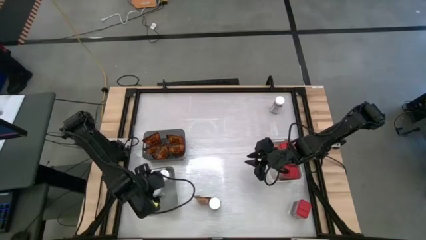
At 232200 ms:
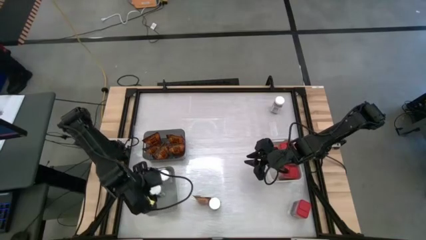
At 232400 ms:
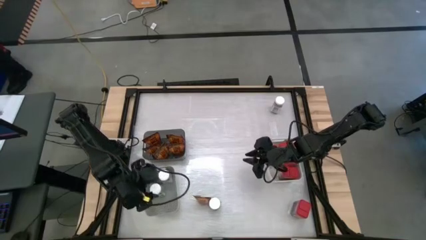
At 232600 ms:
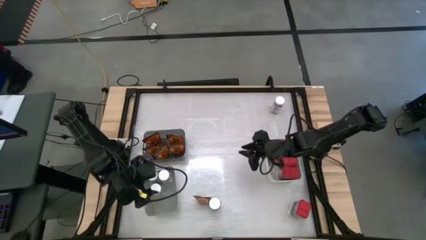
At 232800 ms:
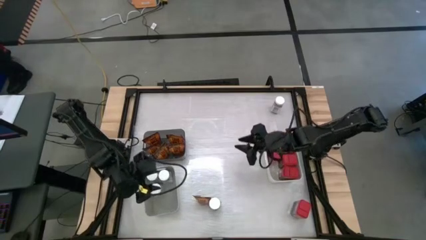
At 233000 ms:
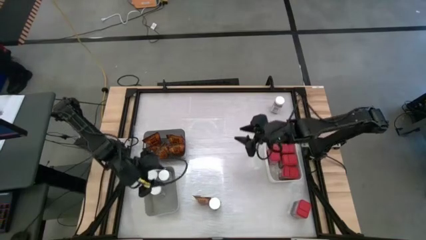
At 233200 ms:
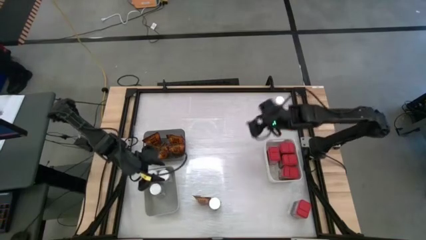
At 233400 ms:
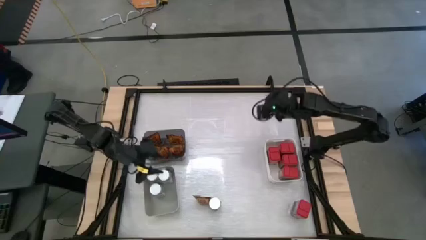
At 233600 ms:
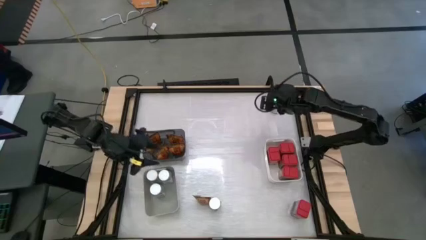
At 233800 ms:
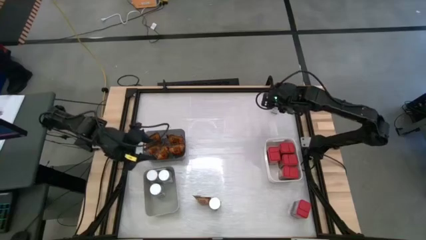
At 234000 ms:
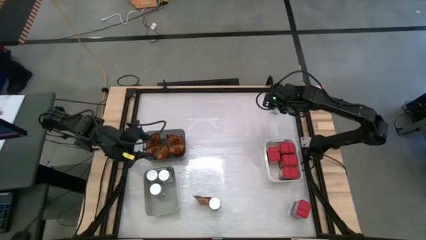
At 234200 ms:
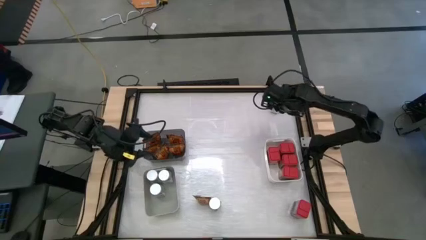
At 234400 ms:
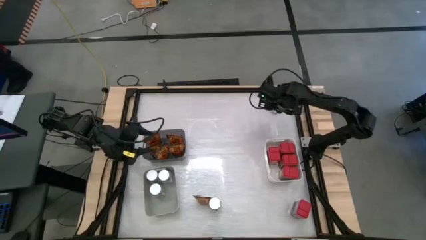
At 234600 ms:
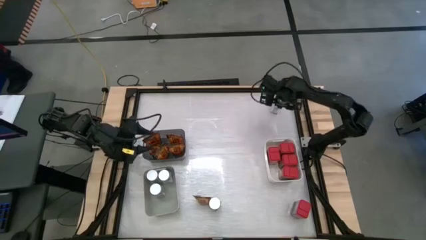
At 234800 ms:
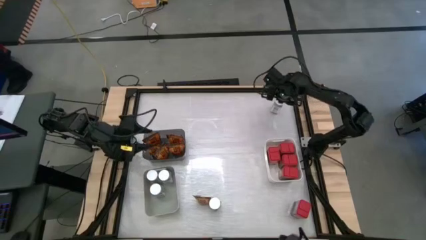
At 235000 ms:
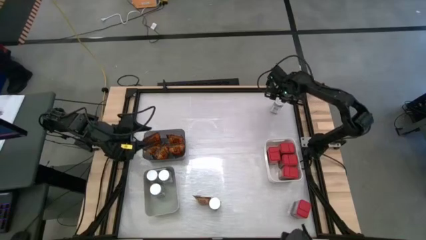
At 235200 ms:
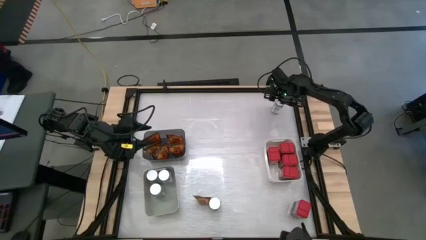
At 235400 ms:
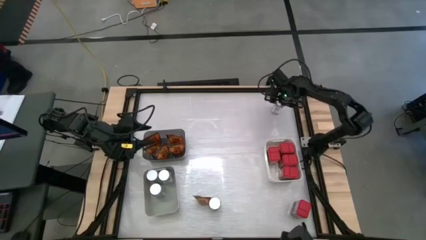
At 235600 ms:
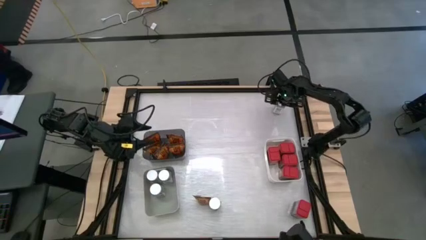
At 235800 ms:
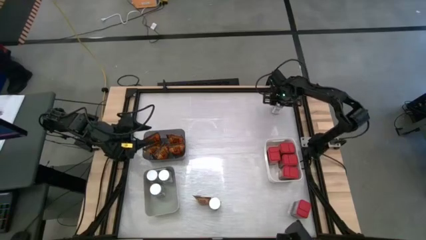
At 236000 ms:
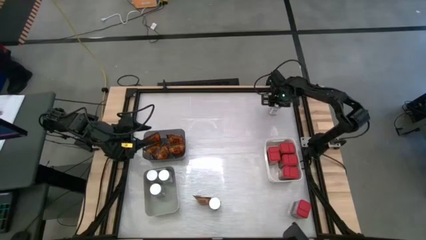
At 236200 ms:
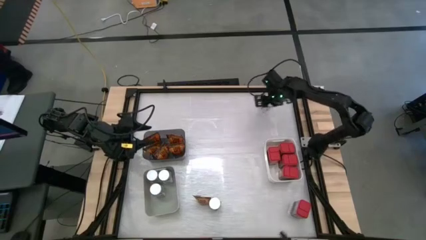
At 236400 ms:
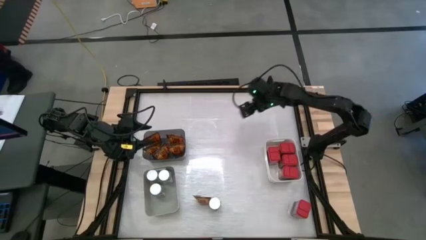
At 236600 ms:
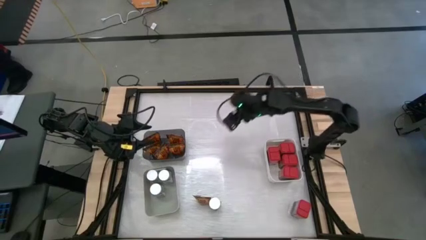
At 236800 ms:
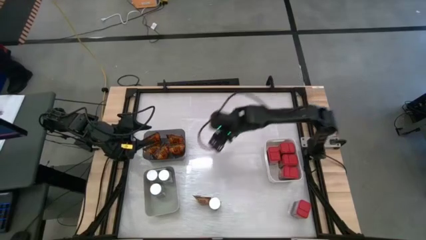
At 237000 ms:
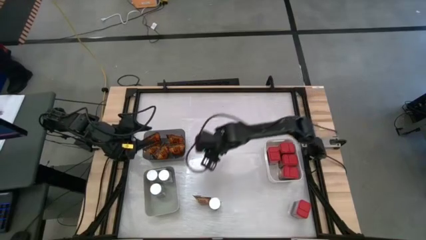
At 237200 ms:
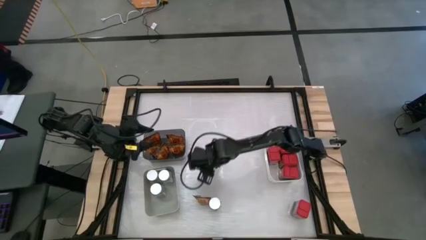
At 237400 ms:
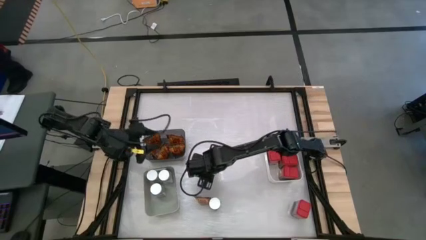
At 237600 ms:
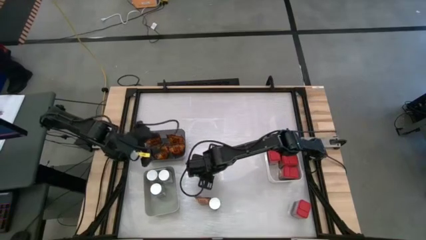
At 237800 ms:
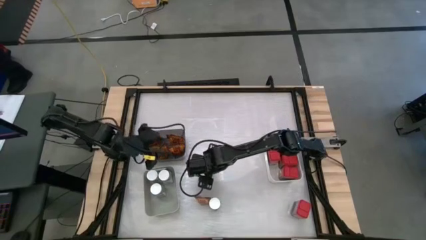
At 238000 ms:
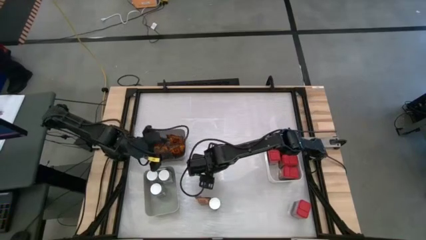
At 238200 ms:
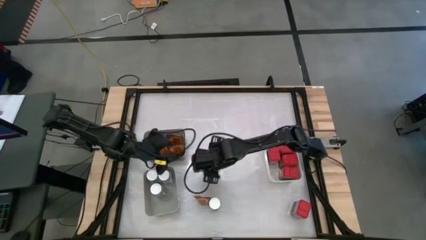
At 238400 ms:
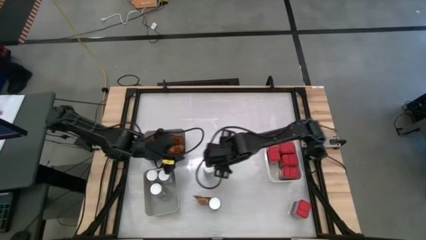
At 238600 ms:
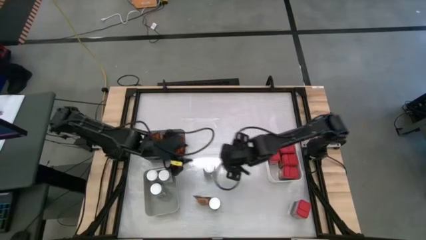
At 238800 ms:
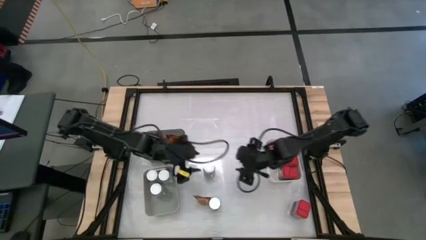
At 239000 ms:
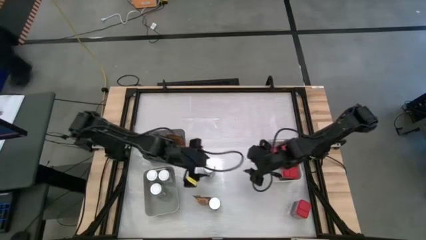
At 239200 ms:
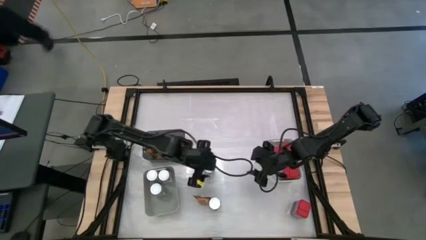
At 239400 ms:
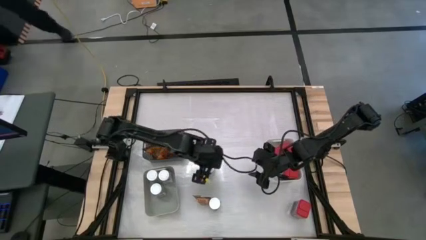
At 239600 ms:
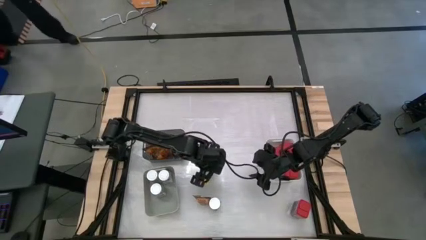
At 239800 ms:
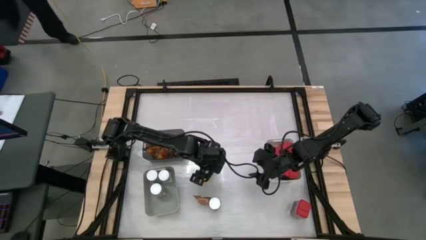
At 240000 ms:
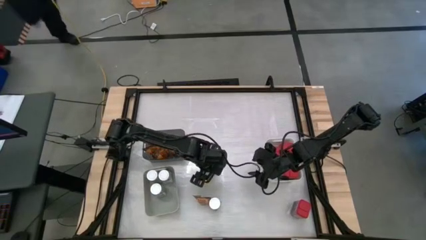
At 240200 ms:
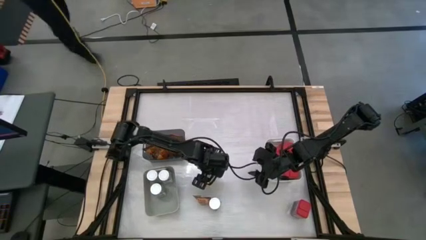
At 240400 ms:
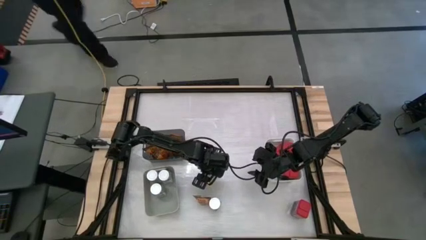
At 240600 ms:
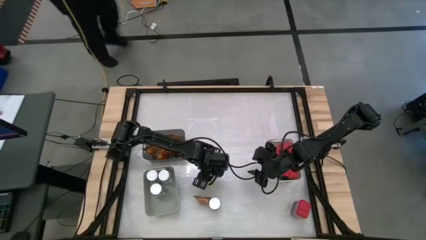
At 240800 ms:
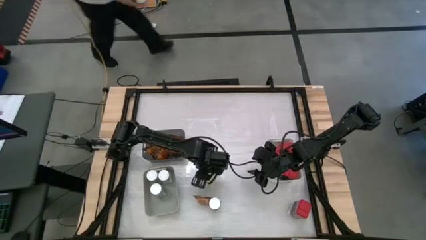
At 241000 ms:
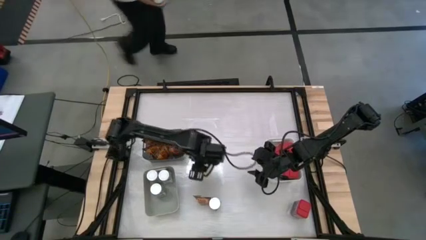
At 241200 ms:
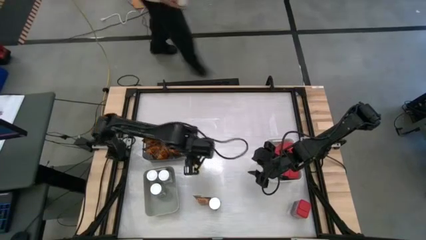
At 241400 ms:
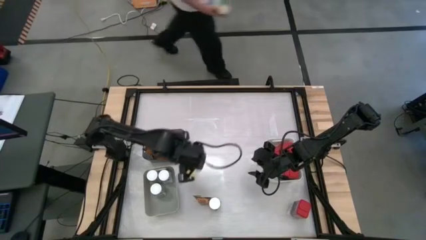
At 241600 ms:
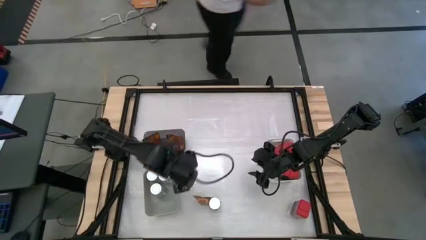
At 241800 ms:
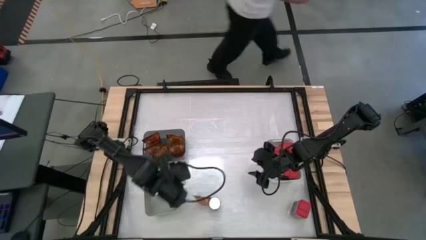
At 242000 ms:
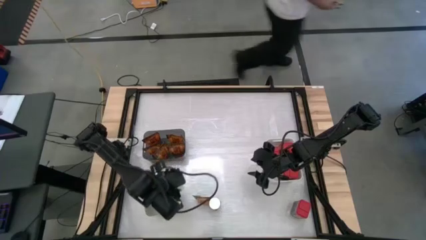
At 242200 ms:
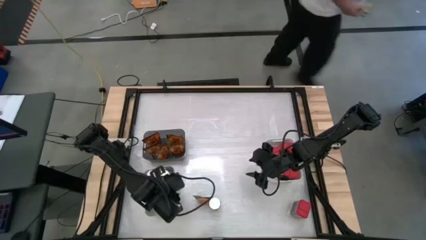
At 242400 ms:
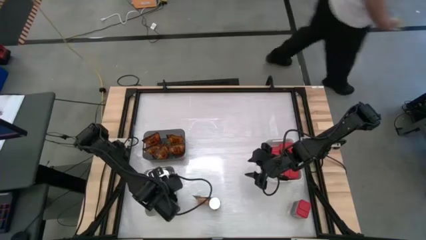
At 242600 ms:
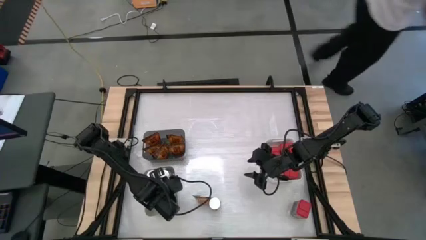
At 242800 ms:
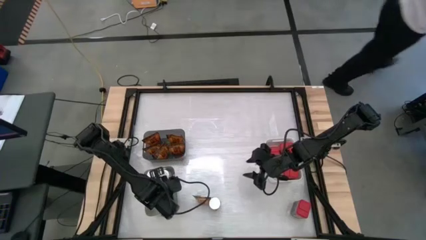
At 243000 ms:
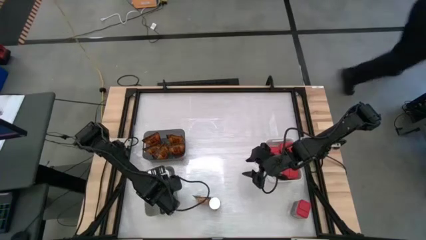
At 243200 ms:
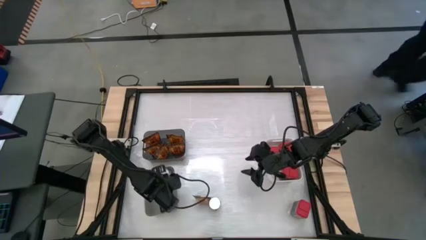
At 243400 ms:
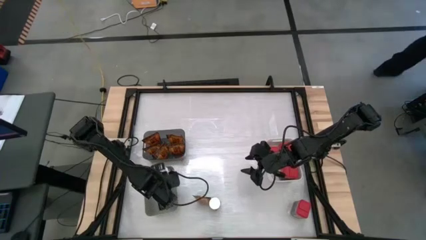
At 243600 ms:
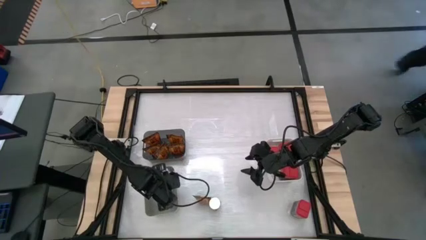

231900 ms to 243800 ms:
Task: Sort spices by type
Put the top white spice bottle into the gray bin

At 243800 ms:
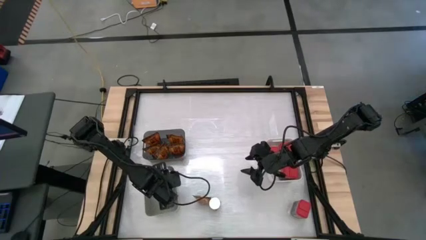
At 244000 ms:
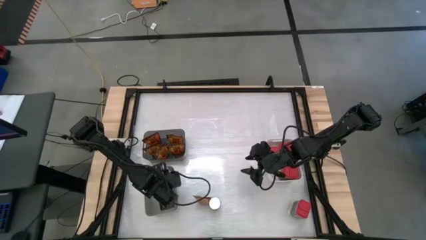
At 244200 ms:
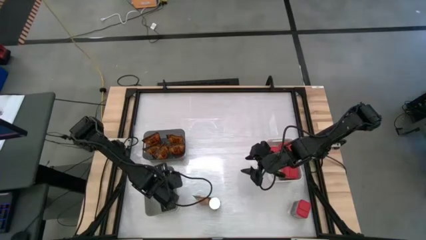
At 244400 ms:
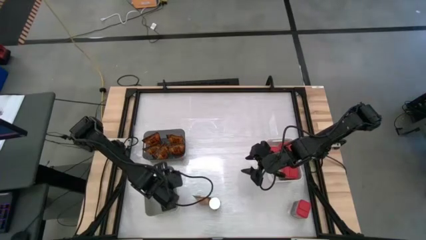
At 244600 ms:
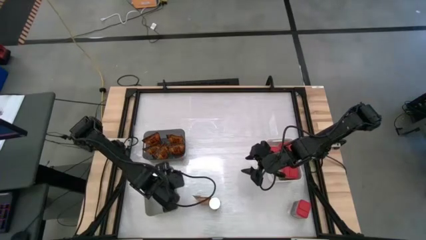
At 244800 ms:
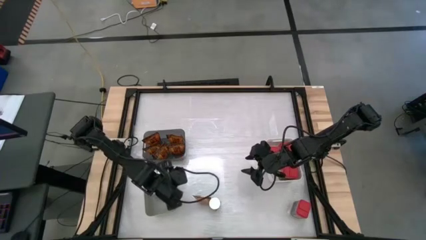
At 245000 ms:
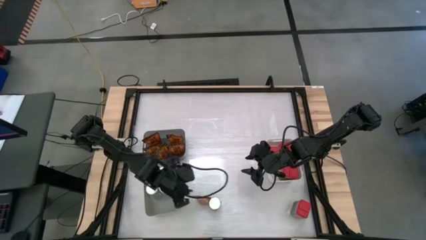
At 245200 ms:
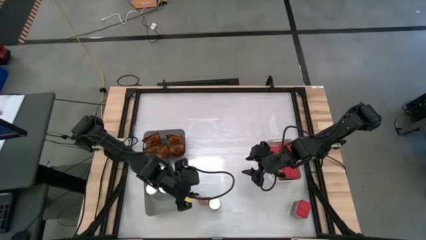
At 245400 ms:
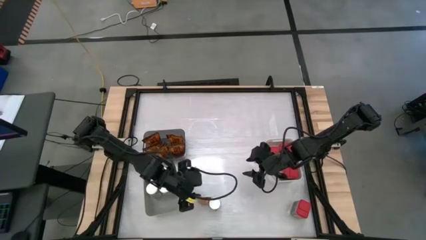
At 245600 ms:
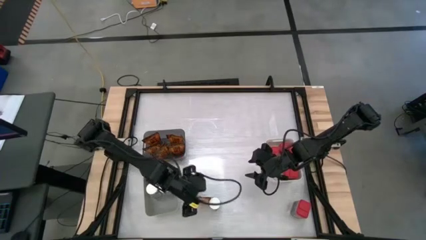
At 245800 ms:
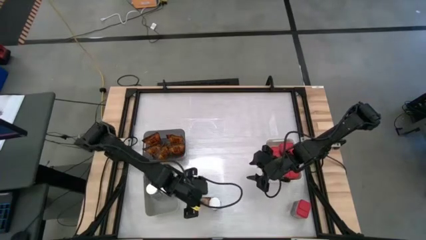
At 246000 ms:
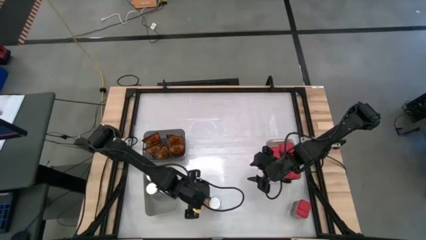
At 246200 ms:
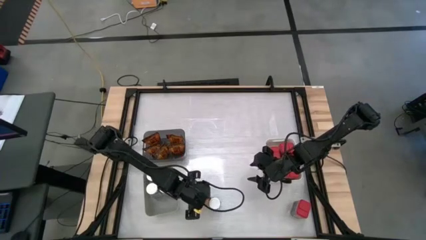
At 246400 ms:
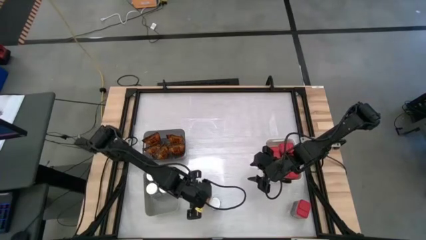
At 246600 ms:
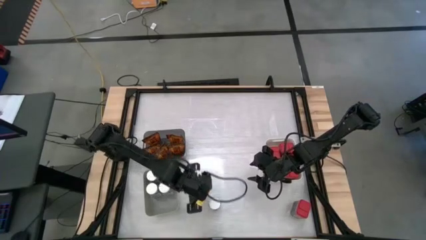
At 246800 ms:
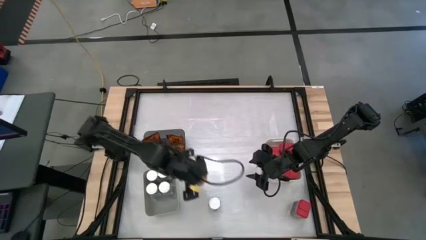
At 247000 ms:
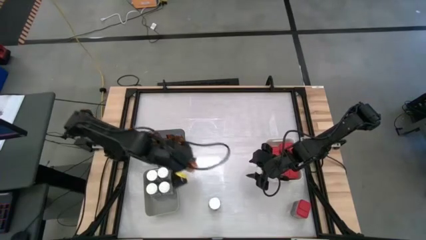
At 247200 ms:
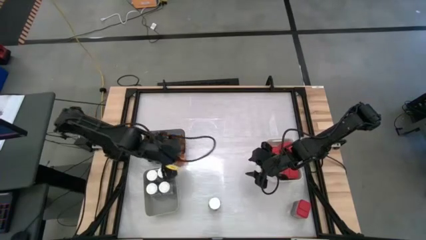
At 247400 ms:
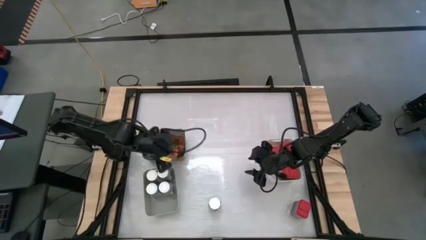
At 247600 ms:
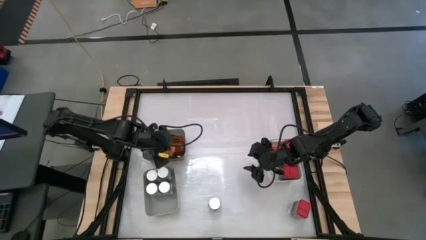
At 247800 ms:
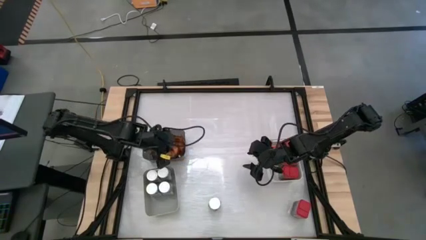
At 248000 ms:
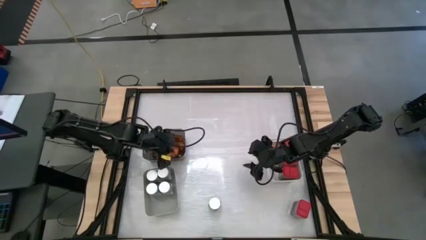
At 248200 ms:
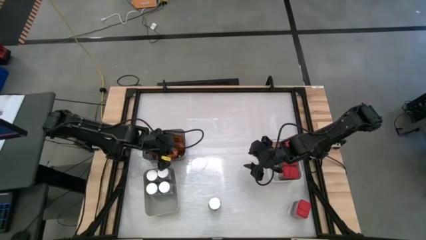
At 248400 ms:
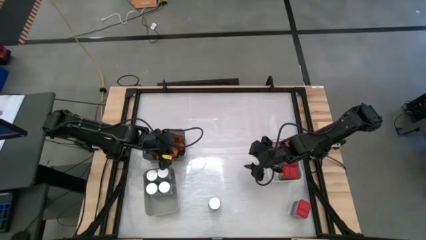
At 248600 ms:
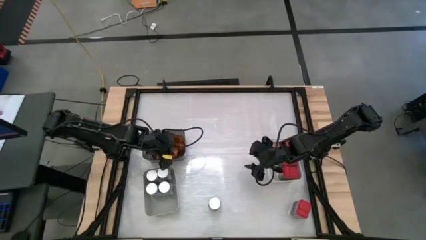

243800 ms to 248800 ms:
Put the orange spice pack into the black bin
